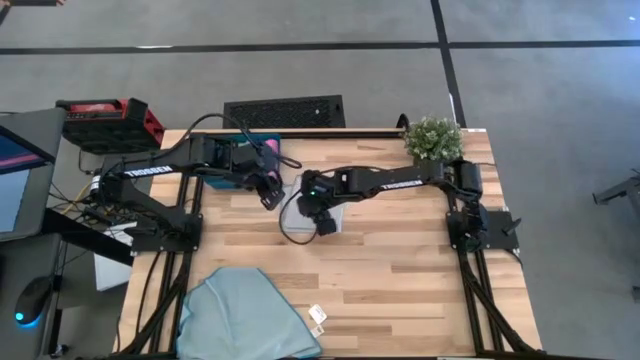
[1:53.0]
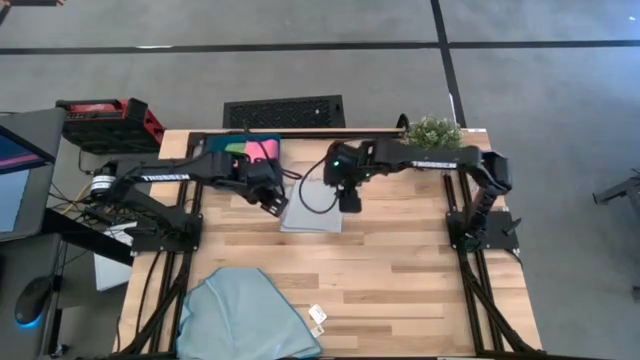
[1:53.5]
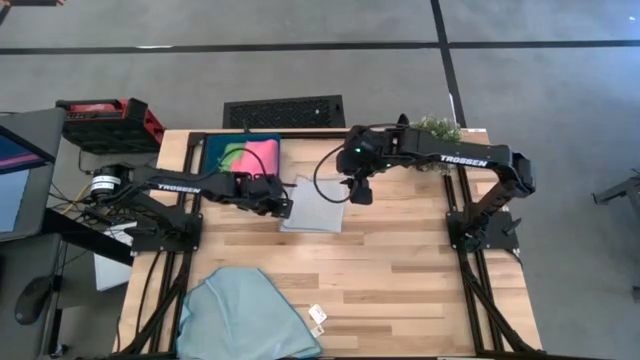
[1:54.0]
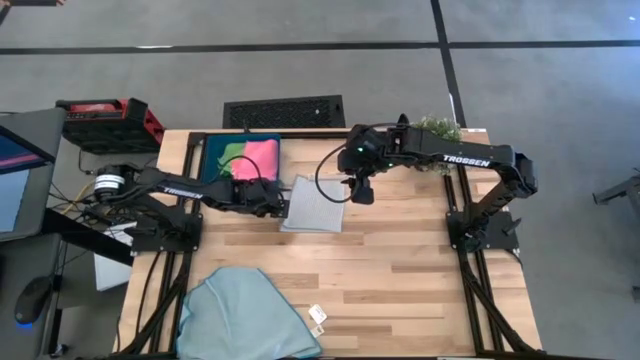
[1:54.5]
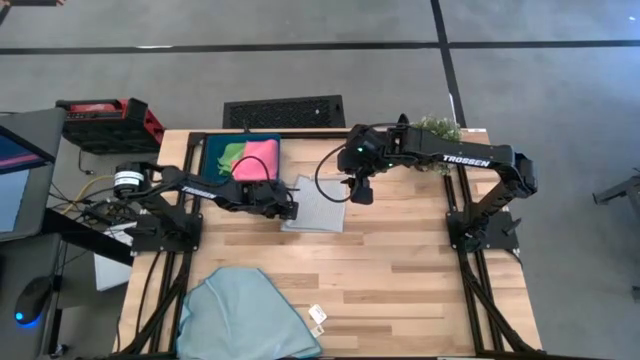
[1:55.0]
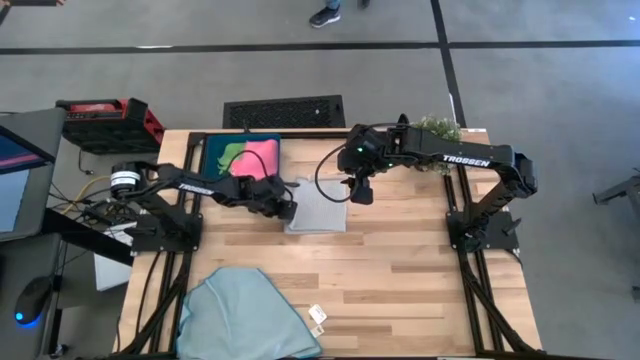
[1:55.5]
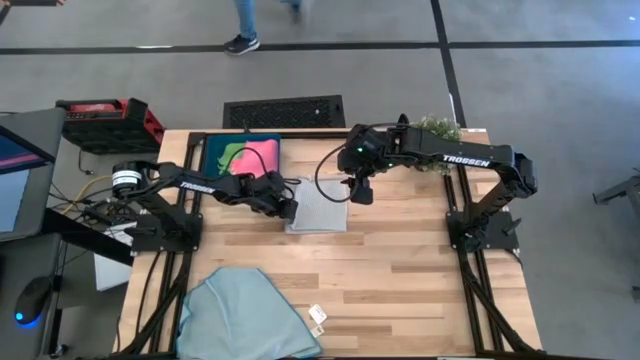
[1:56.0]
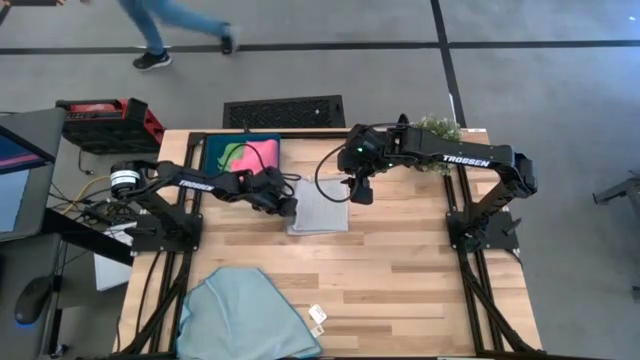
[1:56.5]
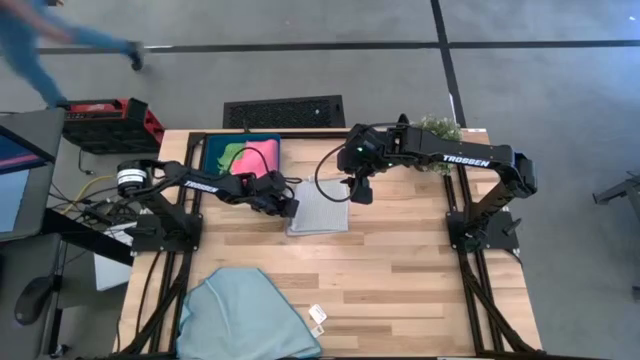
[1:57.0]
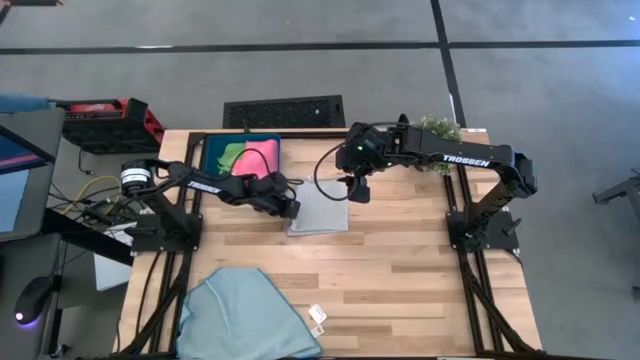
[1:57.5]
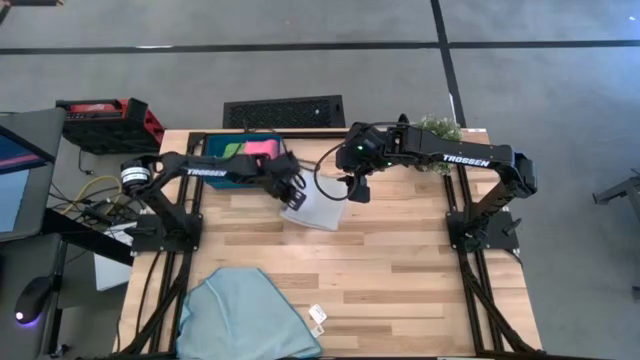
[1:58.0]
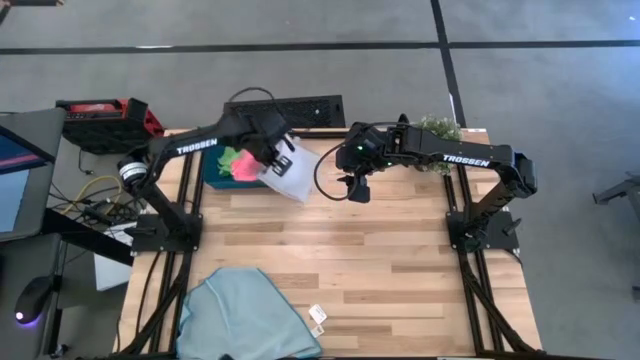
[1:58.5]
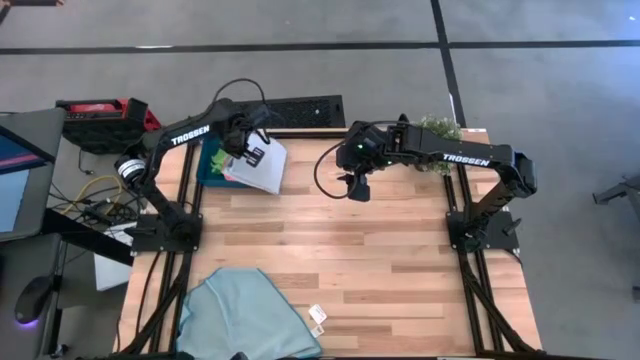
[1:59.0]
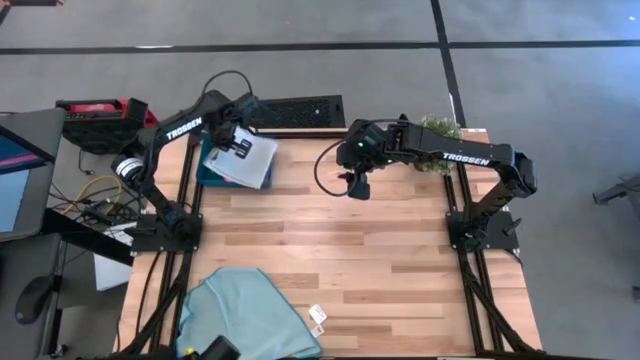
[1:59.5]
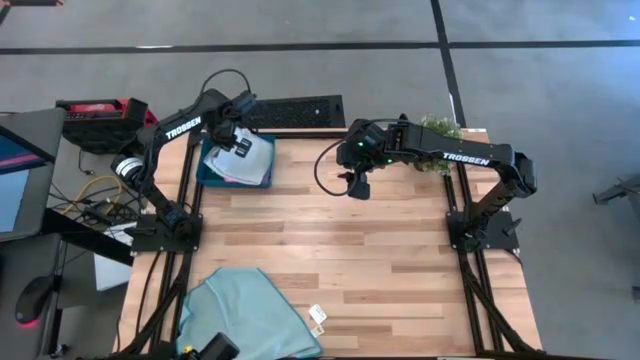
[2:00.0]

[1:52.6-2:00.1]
Task: Fold microfiber towels
Put the gray cloth into the blue bin

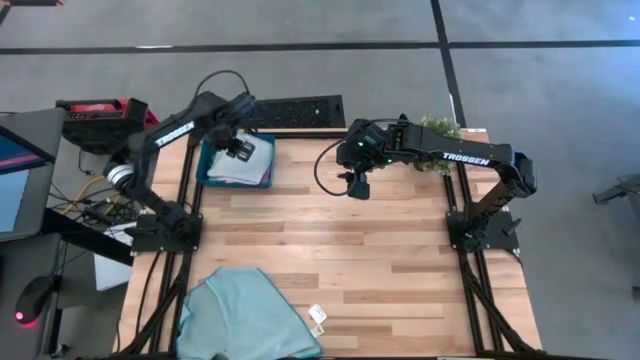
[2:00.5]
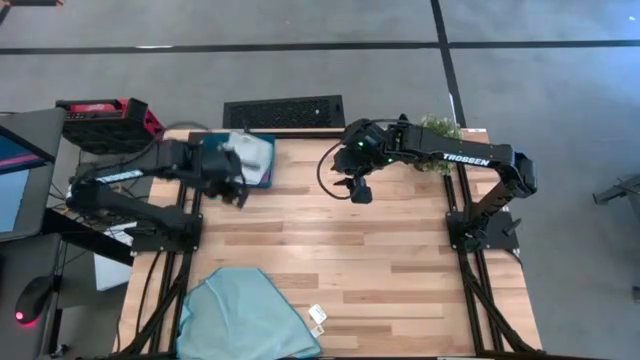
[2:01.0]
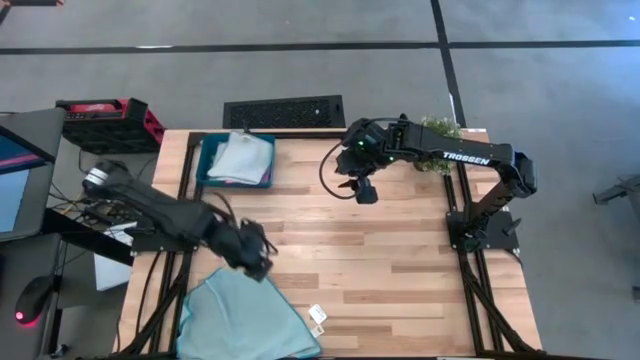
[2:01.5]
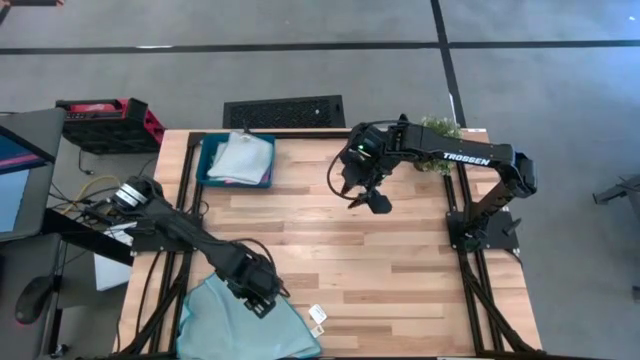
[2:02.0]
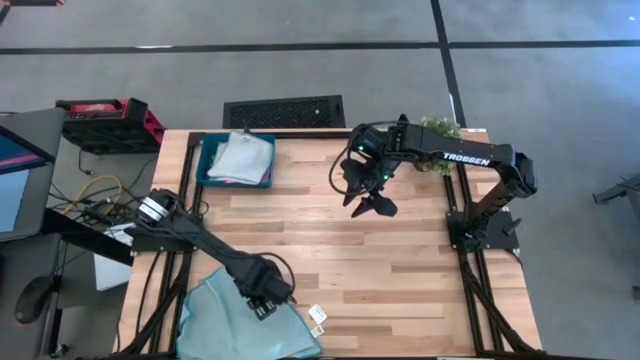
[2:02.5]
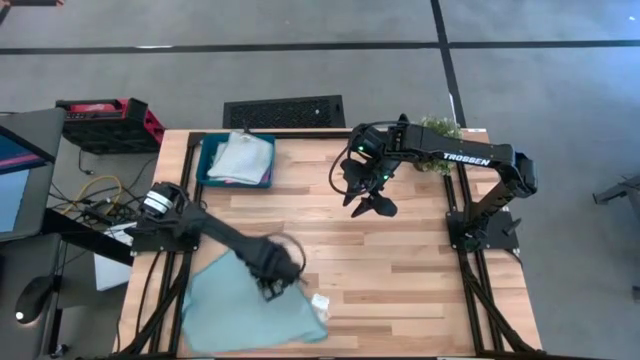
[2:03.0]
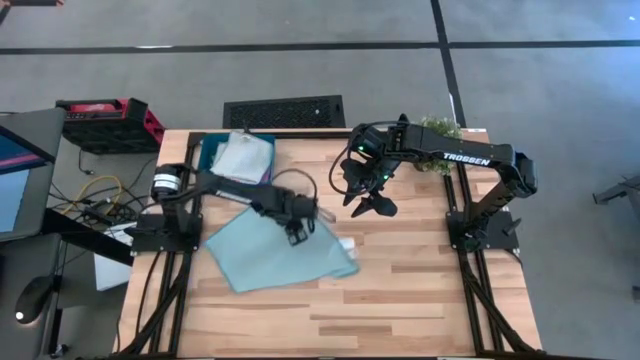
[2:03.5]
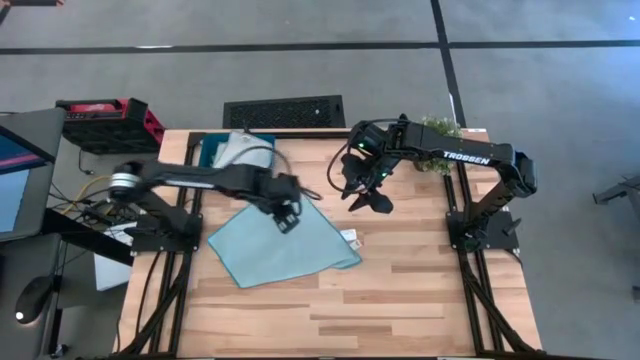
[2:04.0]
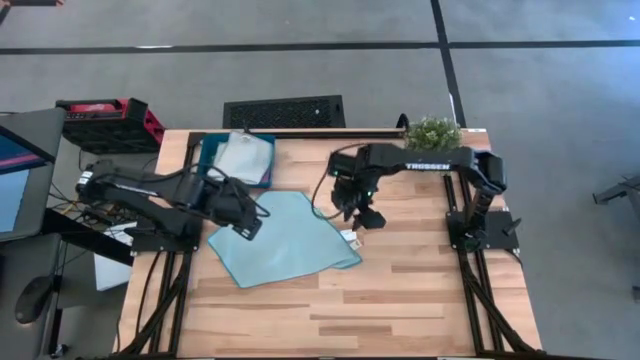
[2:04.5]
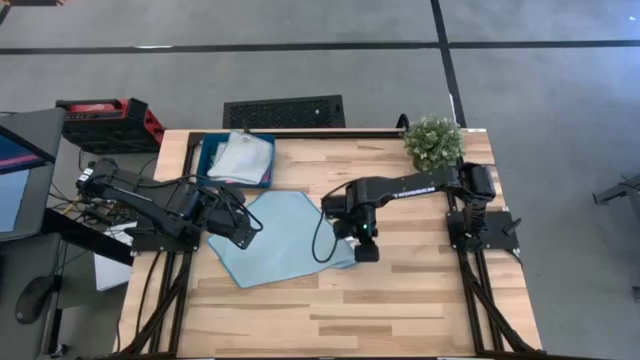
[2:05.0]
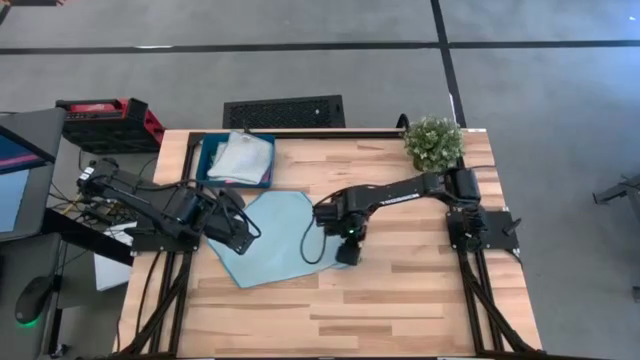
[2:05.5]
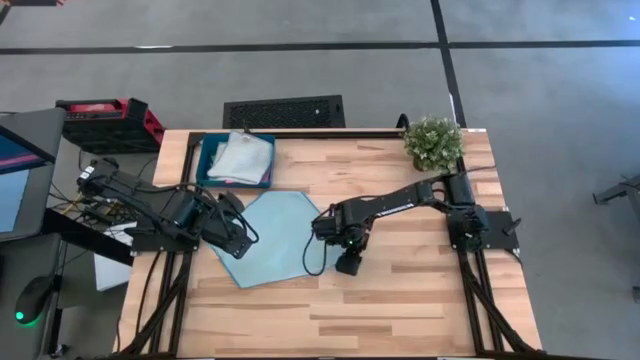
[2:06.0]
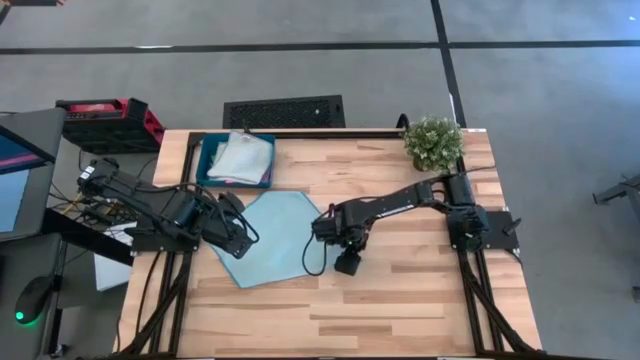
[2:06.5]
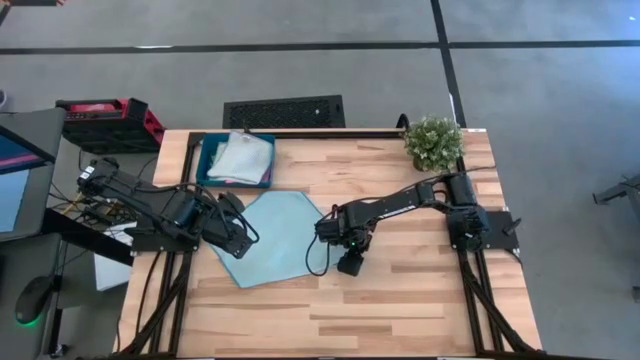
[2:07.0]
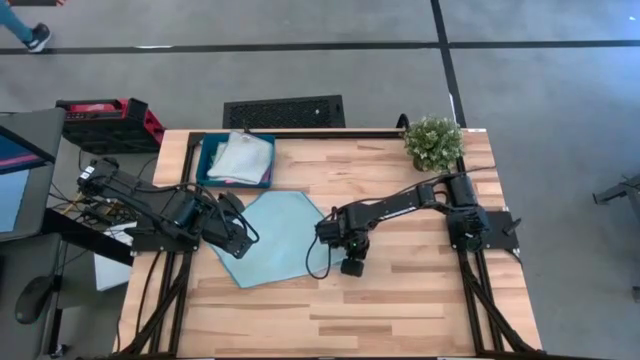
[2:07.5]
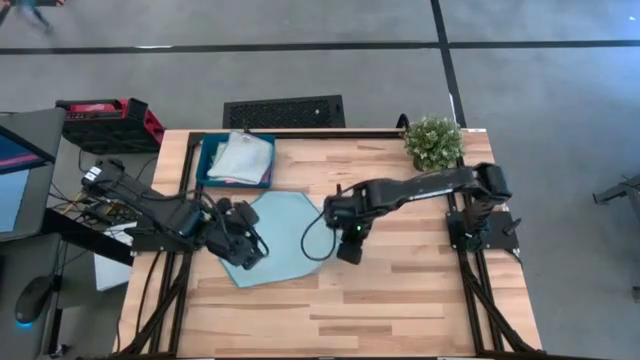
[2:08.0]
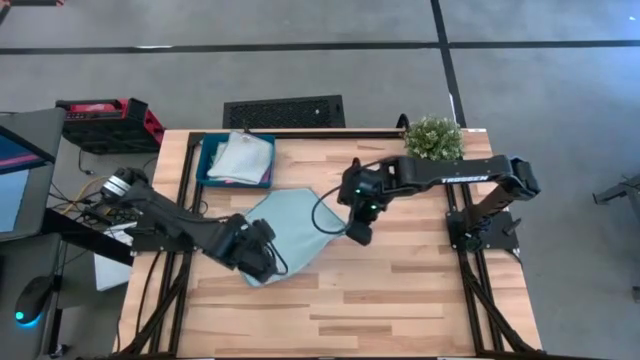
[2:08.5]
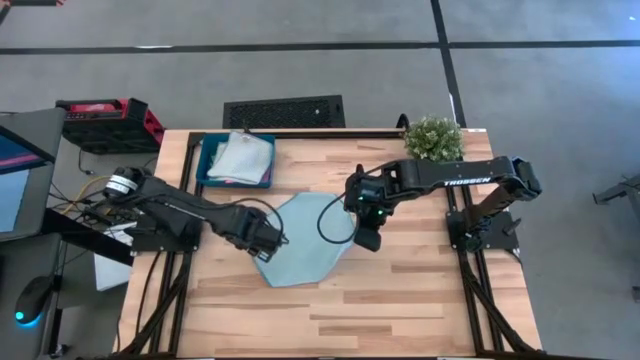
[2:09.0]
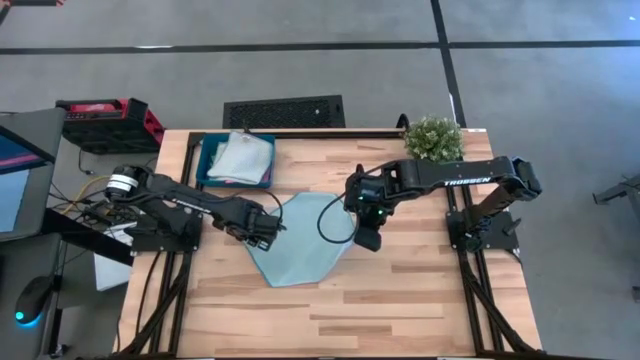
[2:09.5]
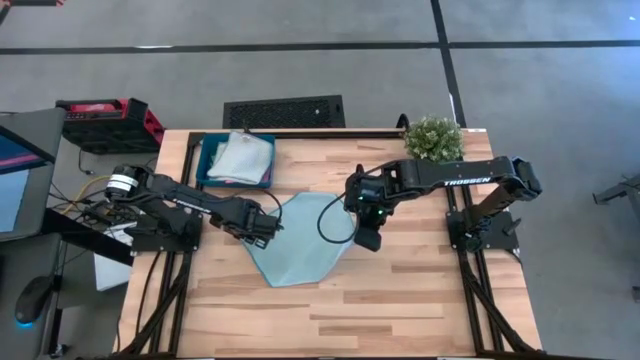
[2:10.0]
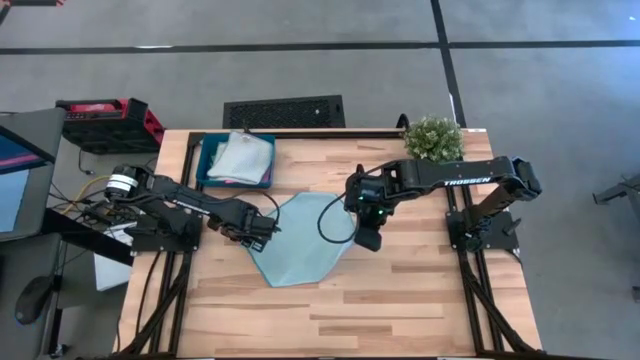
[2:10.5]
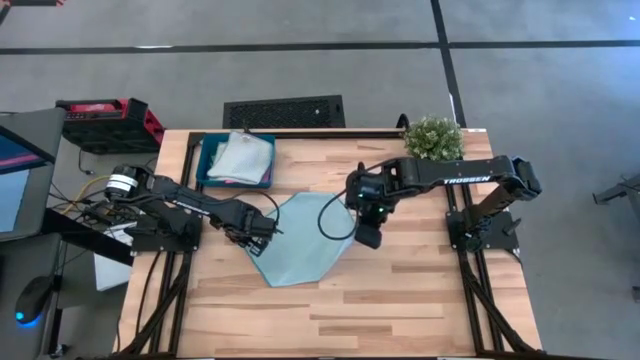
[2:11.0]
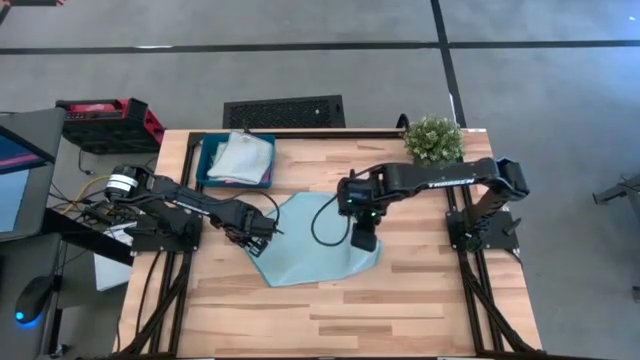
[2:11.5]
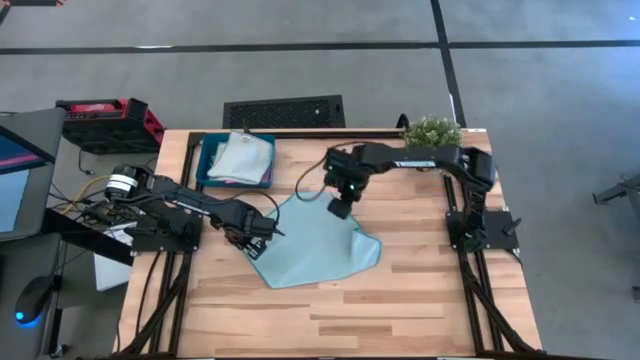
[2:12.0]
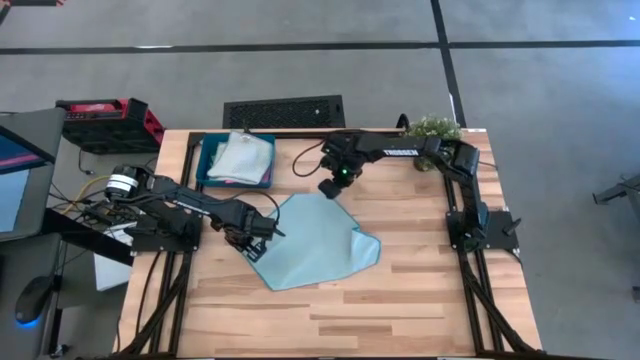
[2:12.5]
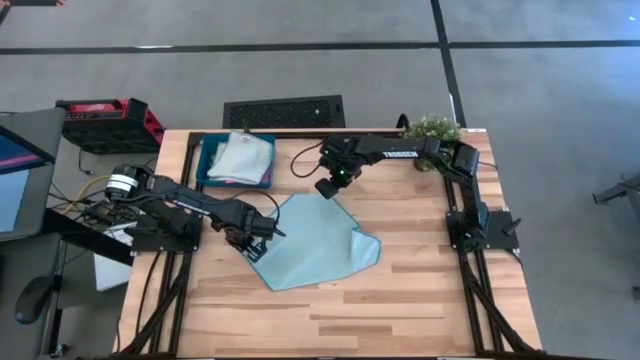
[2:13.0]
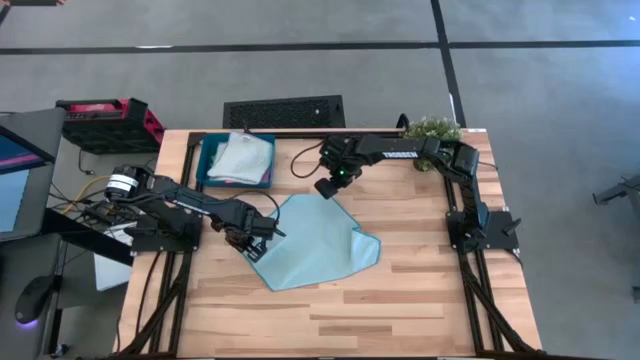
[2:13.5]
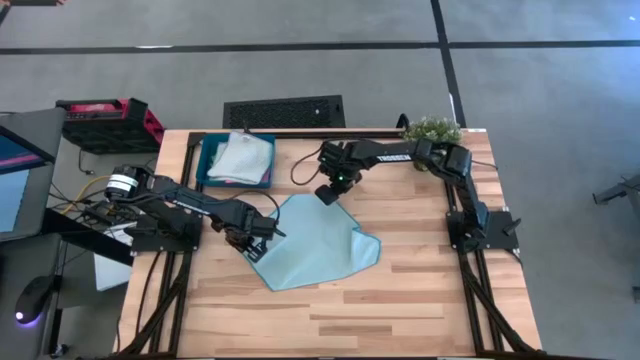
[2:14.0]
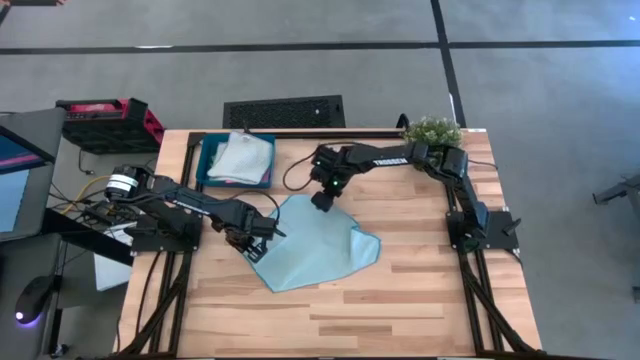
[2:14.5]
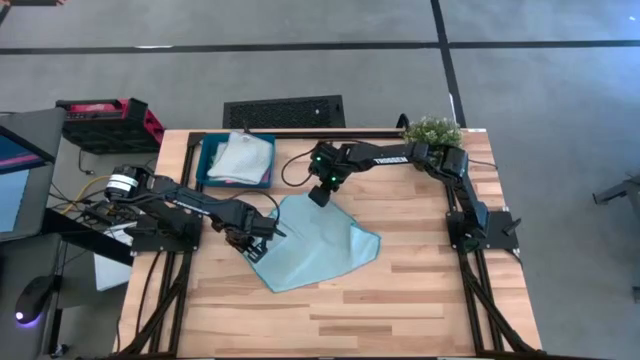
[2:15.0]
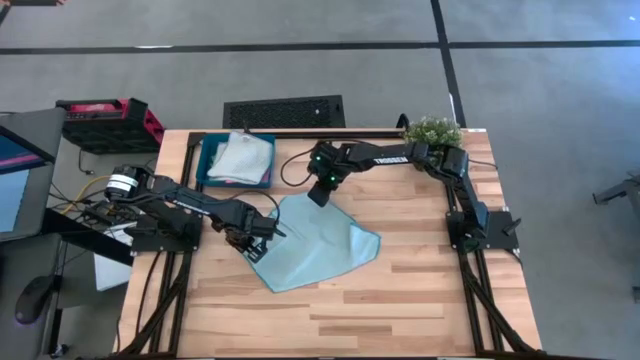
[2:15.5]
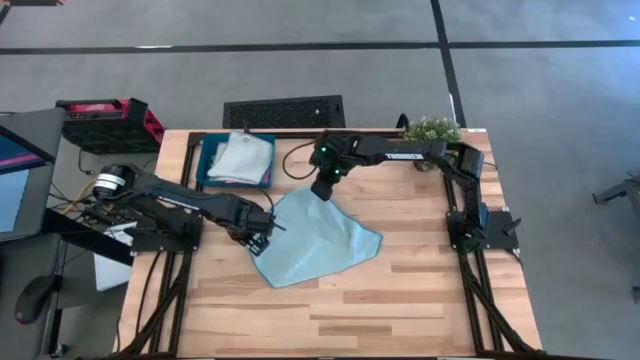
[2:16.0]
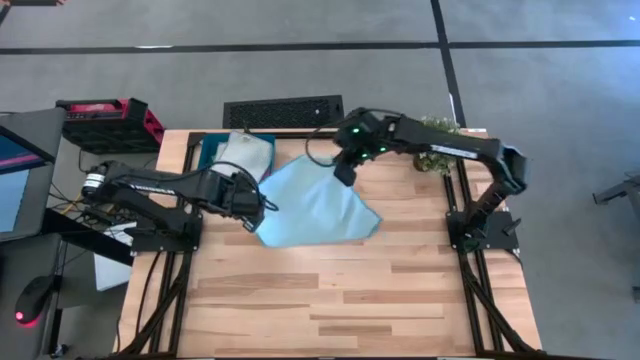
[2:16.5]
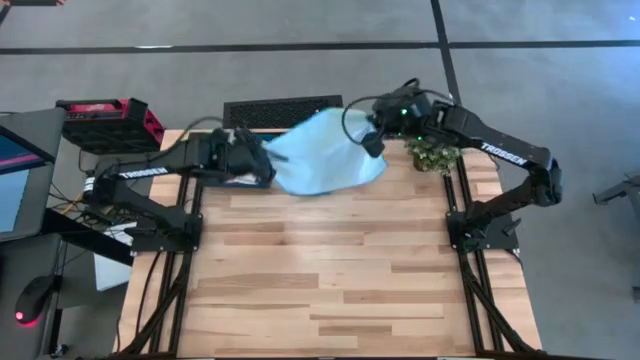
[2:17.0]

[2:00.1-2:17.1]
Fold the blue cloth
